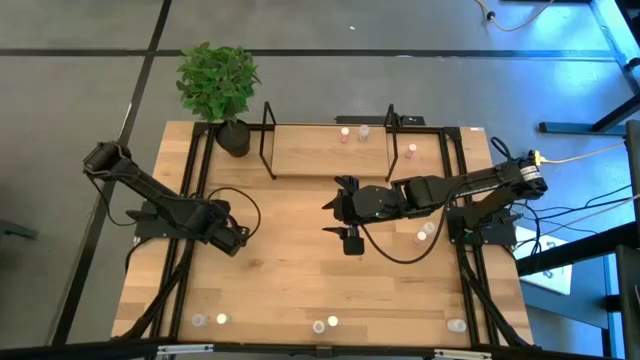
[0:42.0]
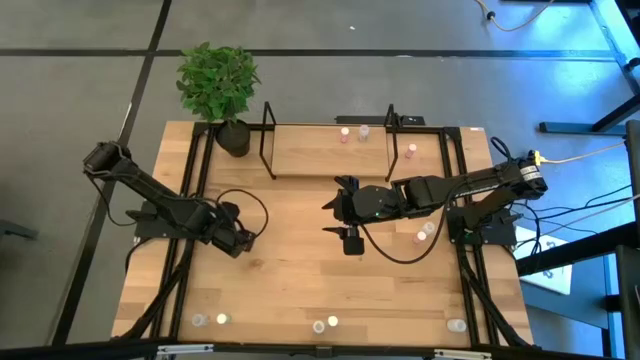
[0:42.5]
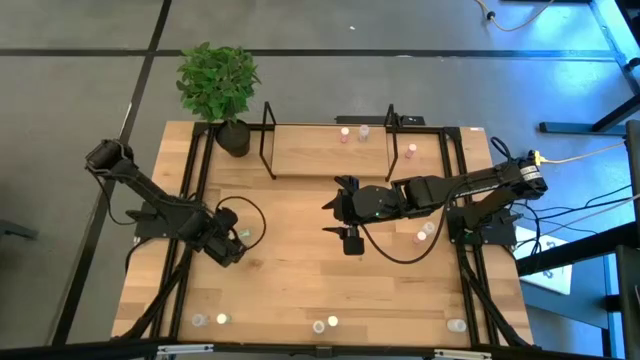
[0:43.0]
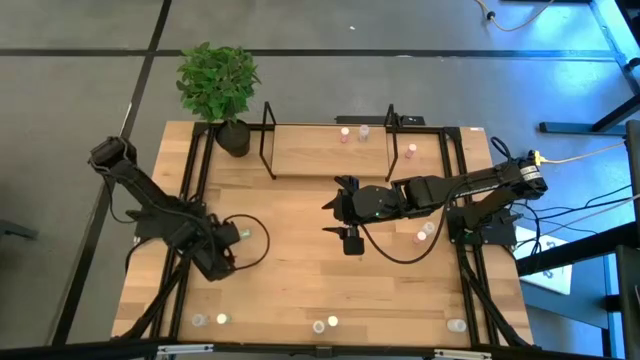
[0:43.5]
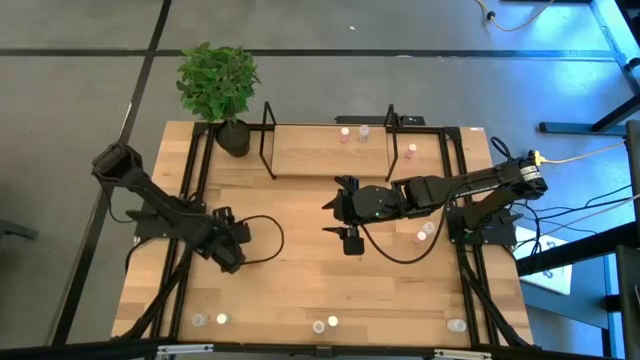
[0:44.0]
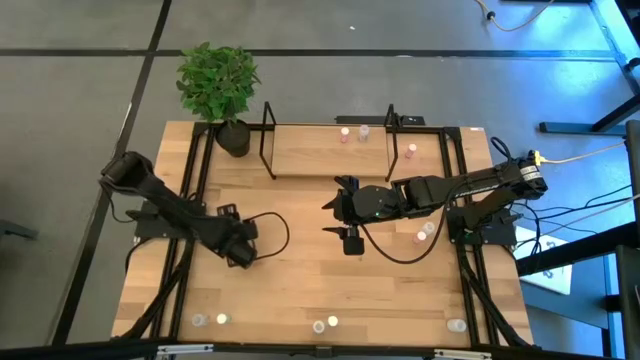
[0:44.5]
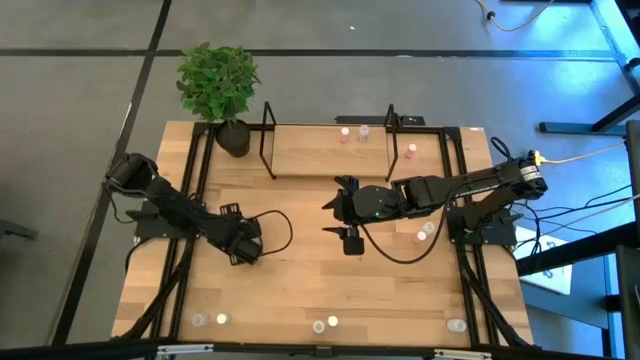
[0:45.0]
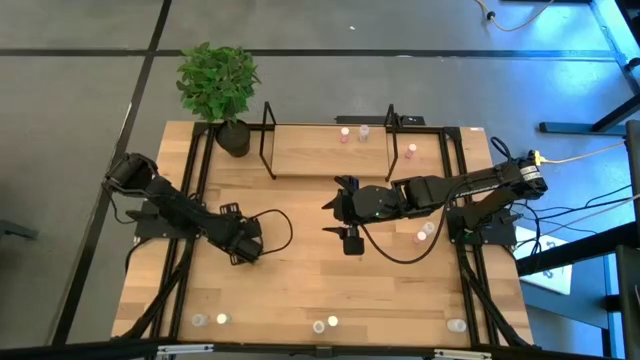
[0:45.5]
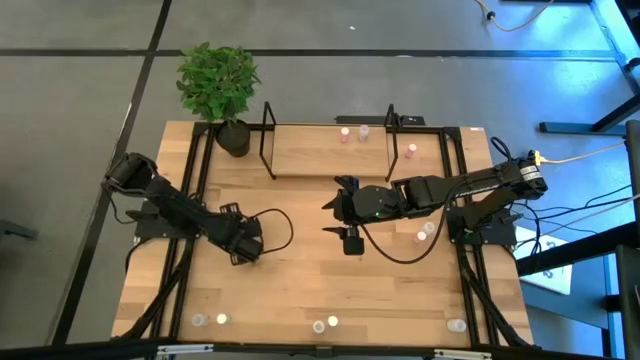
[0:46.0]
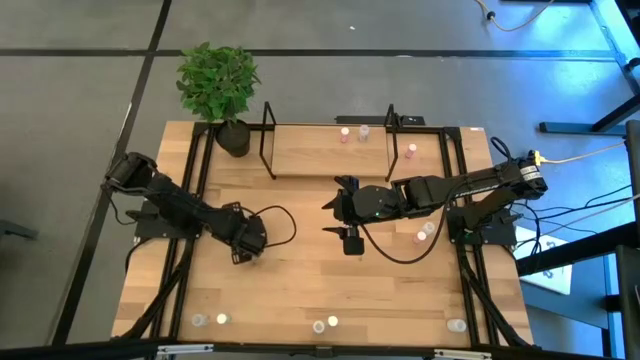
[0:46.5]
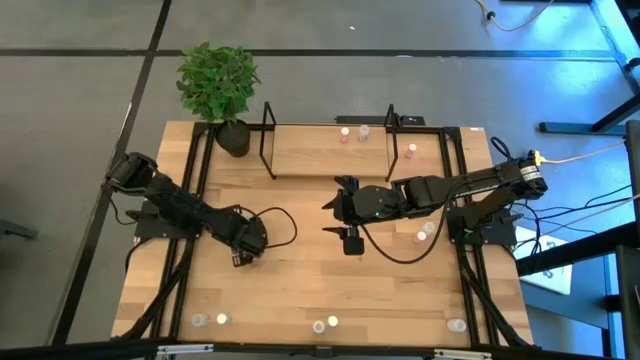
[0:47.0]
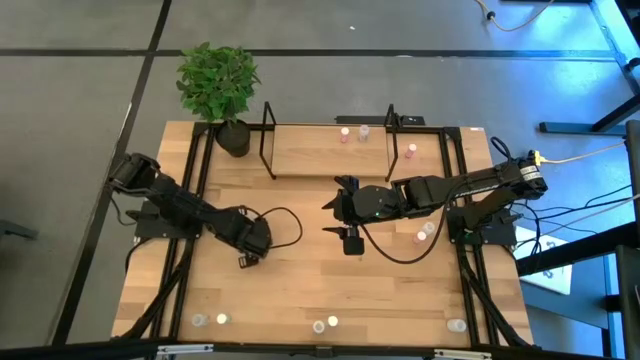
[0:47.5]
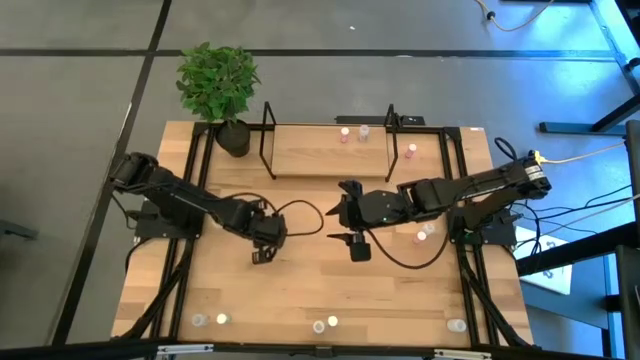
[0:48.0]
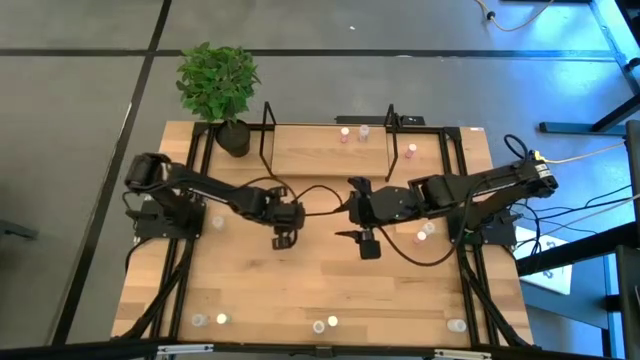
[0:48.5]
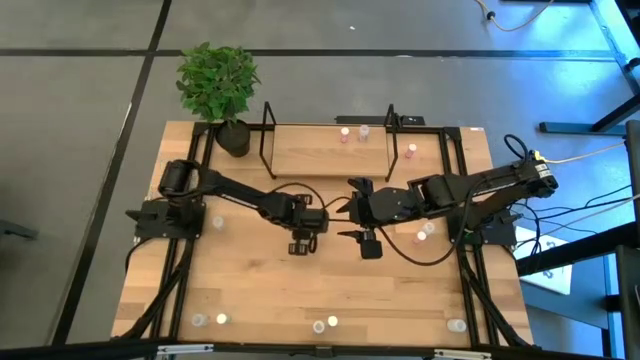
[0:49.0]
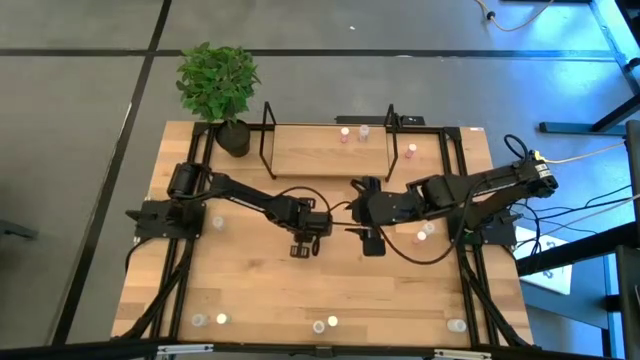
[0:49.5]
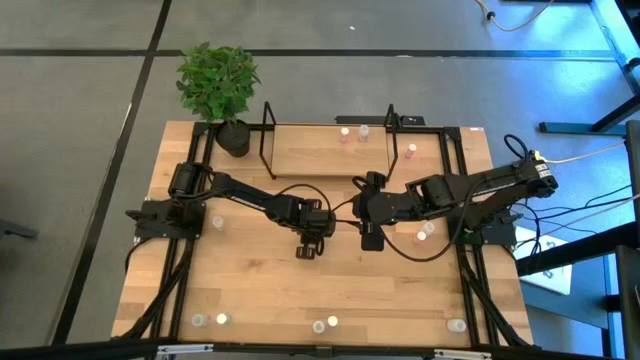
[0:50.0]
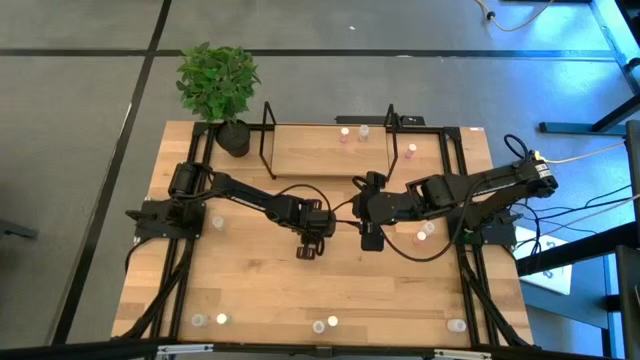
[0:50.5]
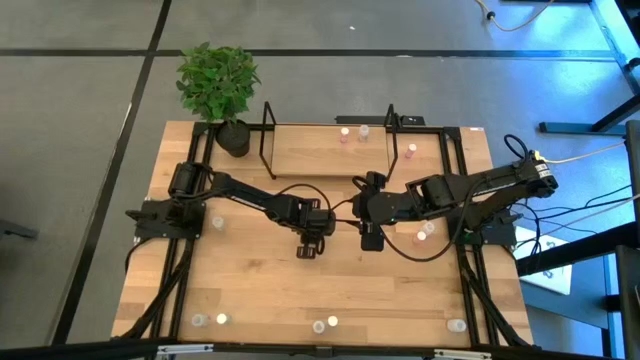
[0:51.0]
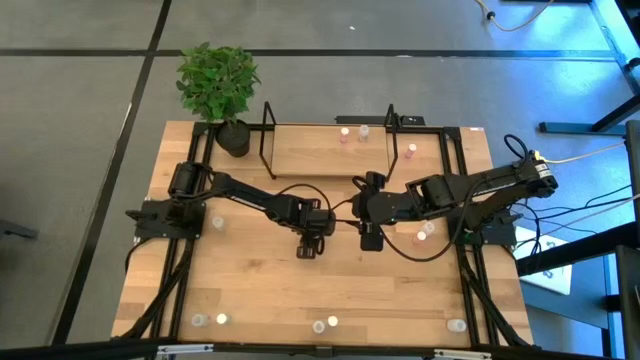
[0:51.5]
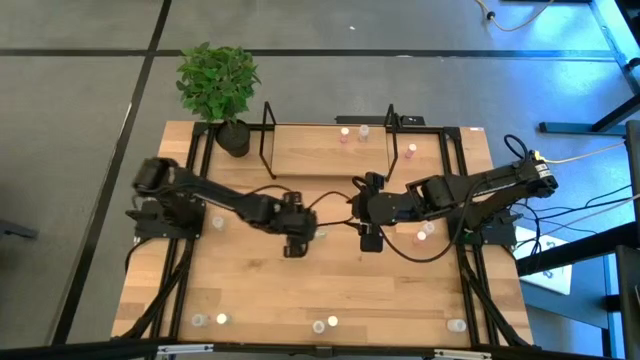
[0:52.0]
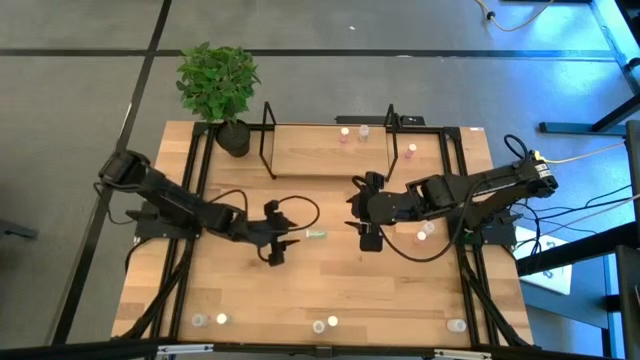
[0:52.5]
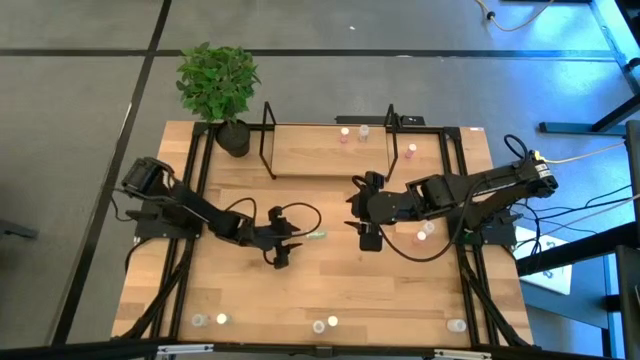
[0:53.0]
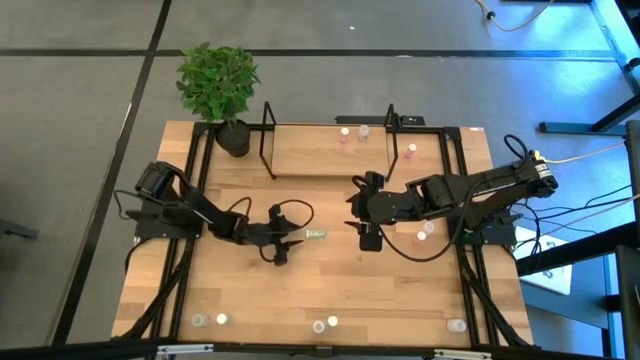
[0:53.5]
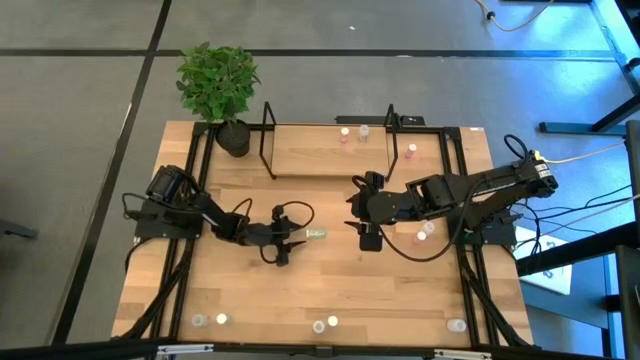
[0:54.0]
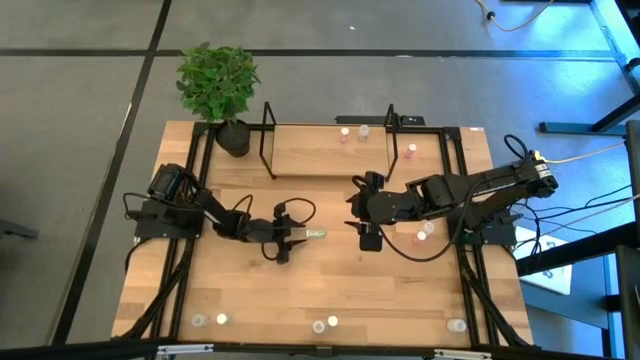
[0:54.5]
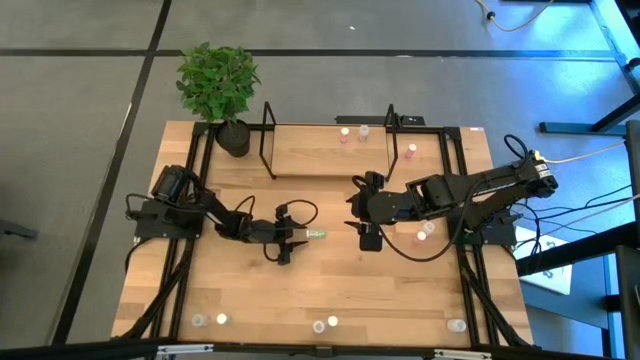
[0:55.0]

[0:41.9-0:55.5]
Task: Pick and place medicine bottles onto shelf by color
Put the top blue medicine bottle on the shelf

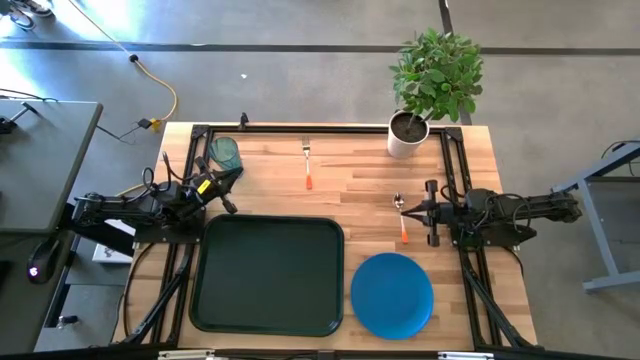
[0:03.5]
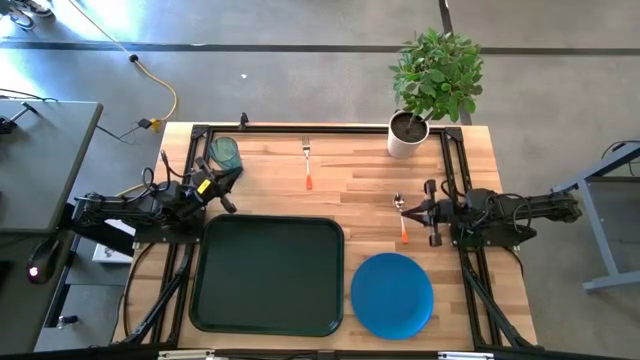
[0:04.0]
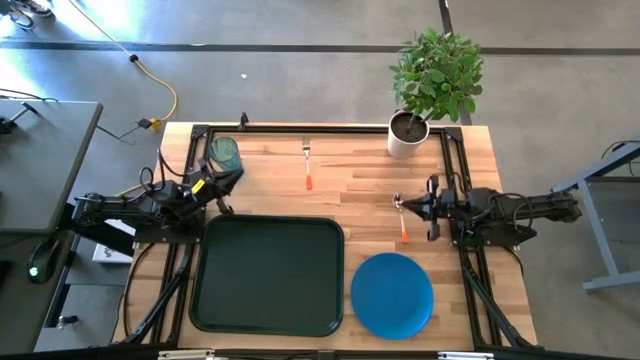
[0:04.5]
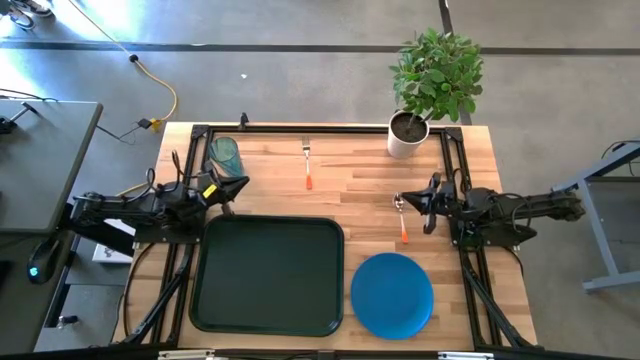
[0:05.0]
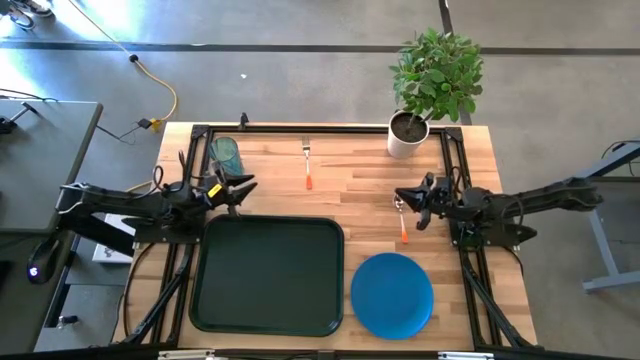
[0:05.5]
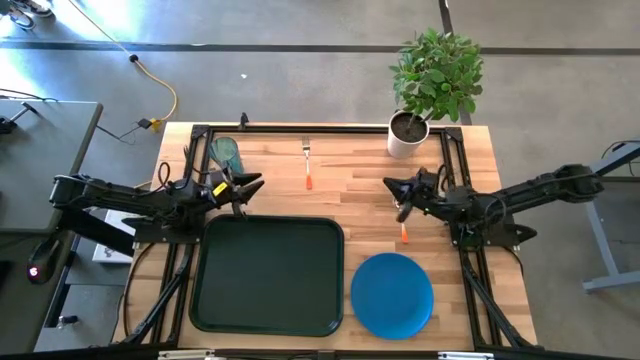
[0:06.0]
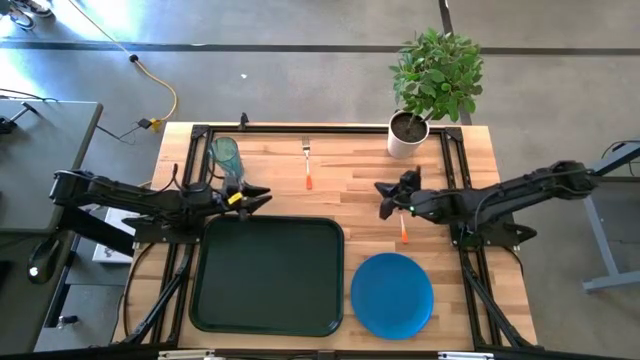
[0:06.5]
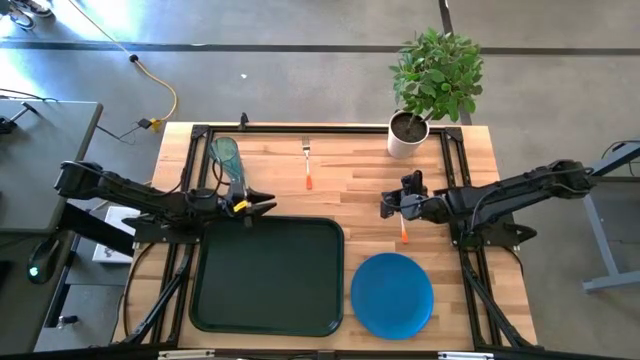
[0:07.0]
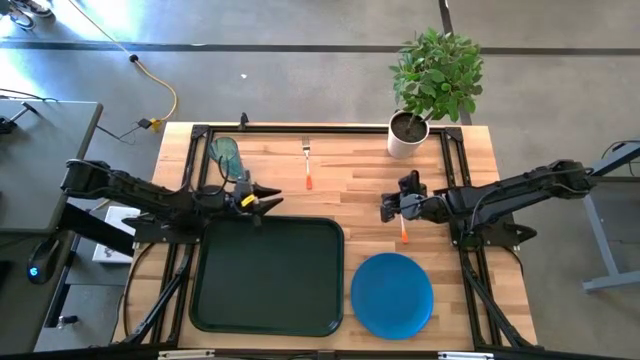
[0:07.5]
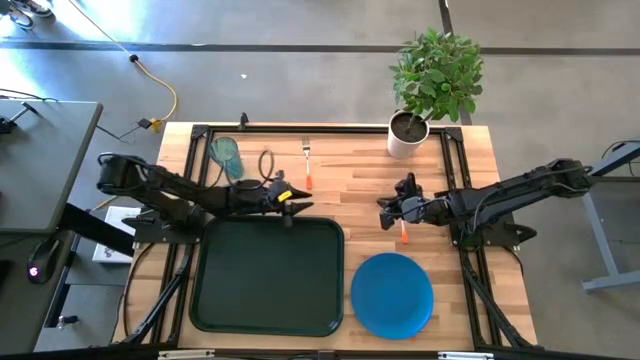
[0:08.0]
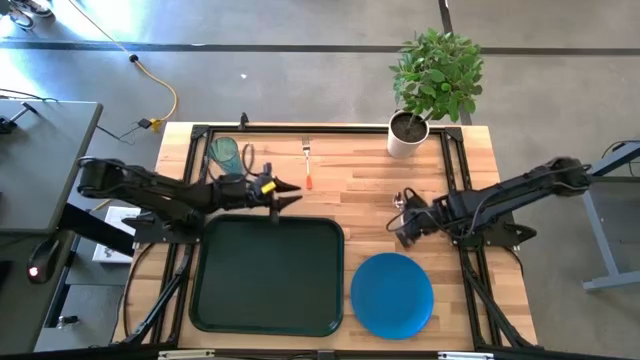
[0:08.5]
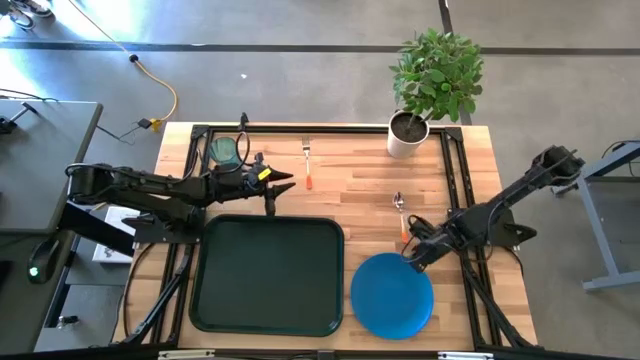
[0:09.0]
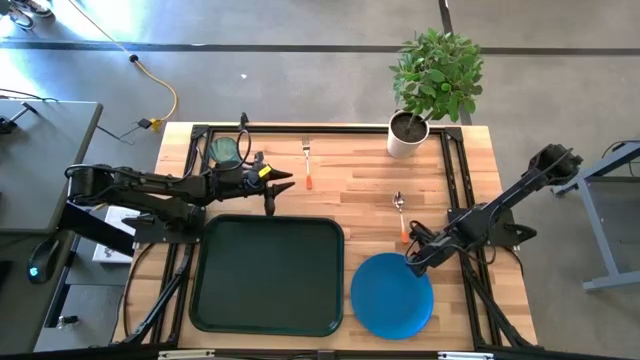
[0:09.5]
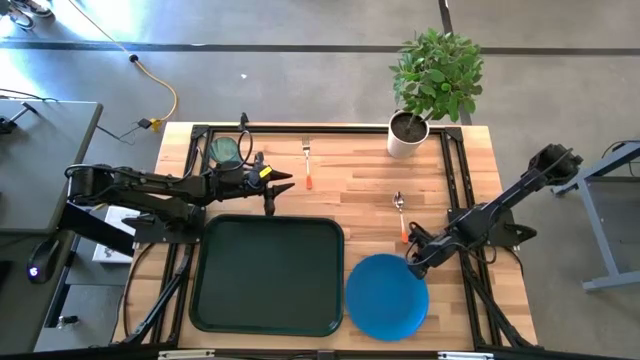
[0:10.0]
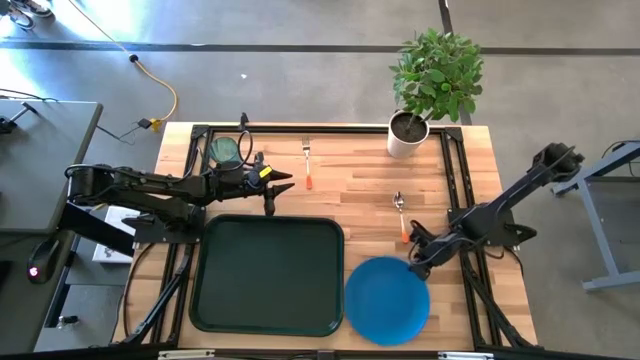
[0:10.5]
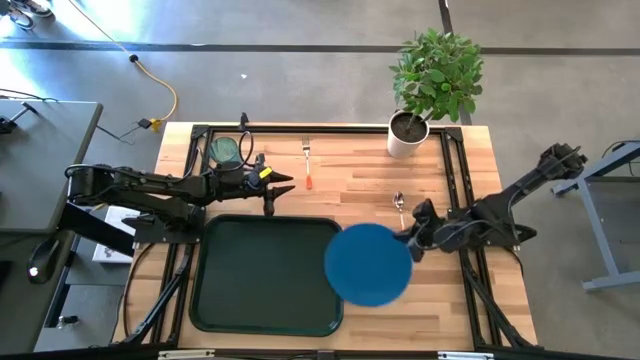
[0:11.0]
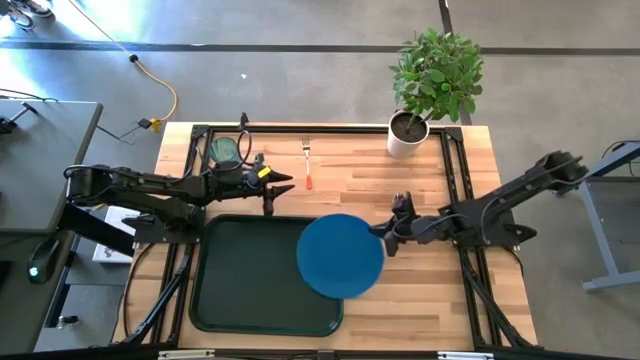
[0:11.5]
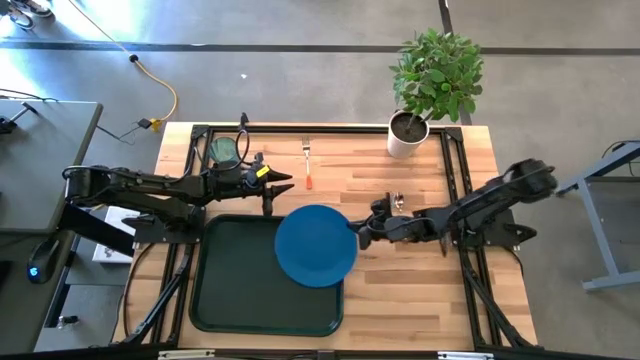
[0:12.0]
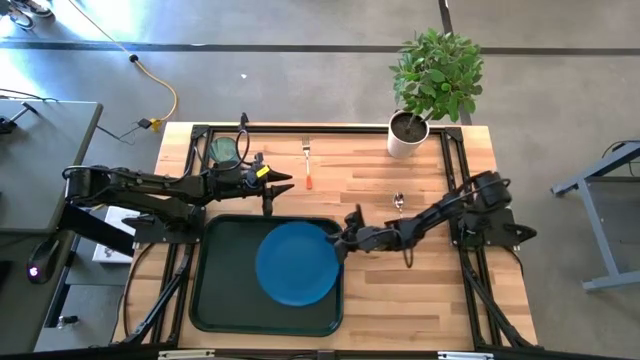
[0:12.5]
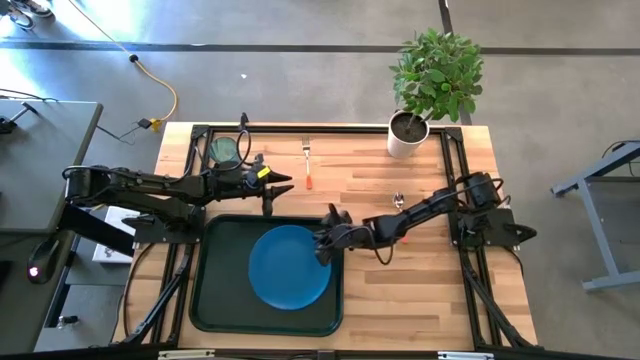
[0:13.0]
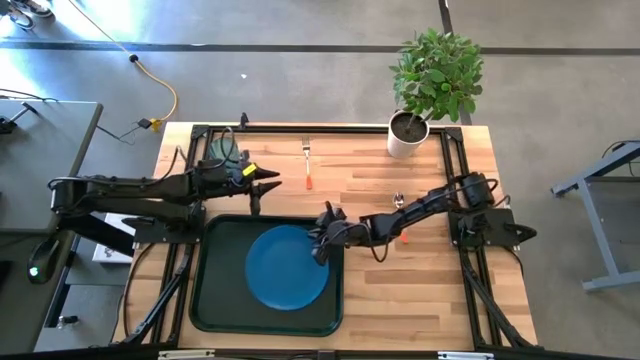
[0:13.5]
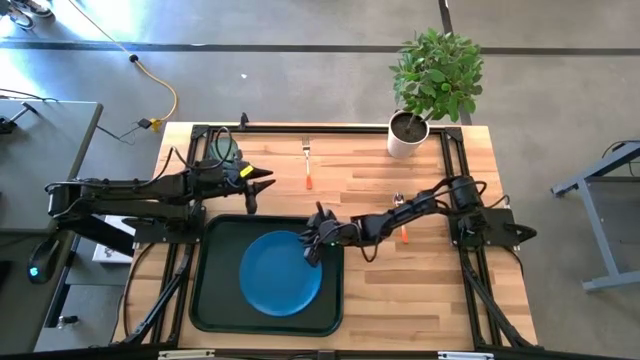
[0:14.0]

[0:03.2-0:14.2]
Task: Pick and place plate/cup/fork/spoon on tray
Put the blue plate on the black tray
